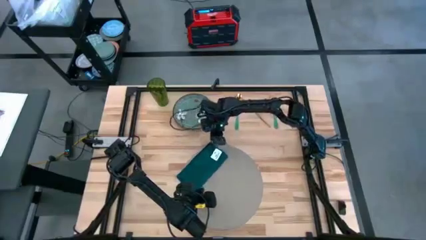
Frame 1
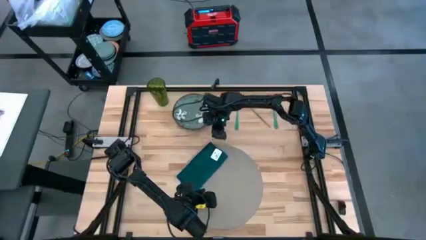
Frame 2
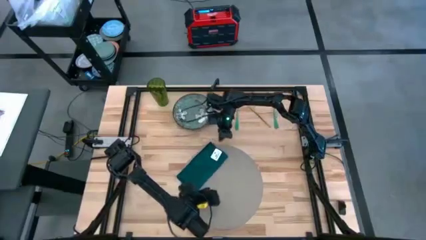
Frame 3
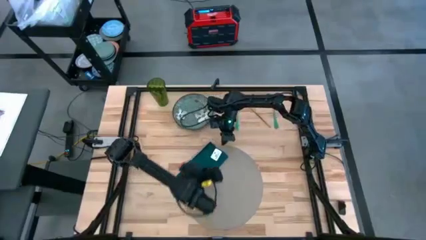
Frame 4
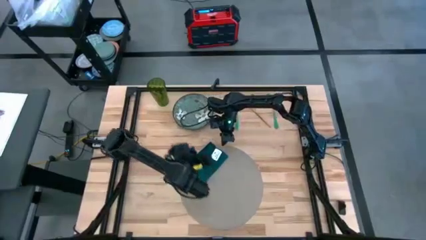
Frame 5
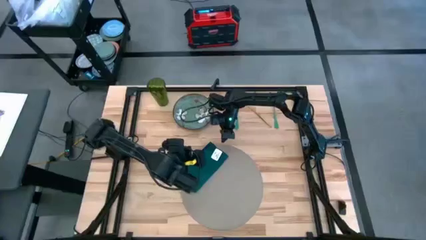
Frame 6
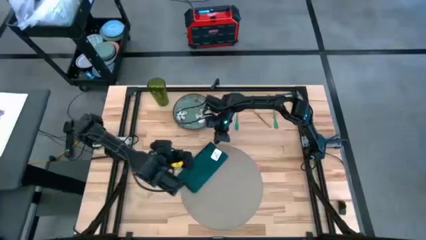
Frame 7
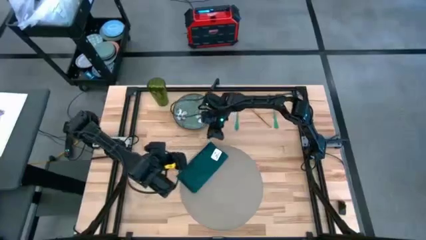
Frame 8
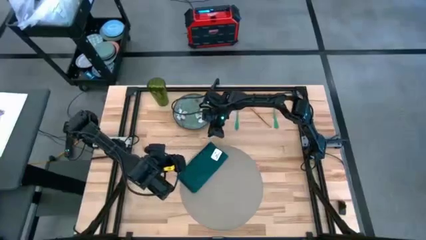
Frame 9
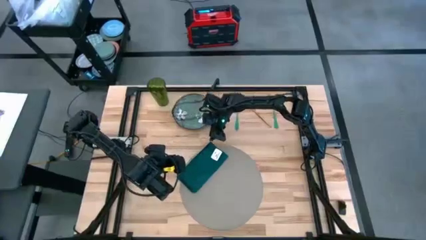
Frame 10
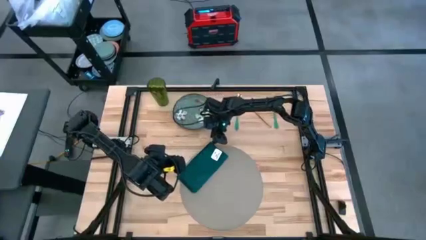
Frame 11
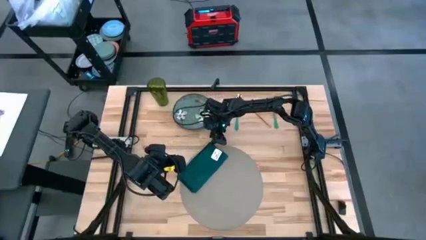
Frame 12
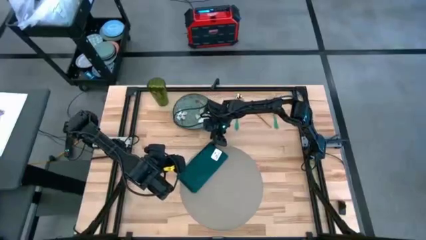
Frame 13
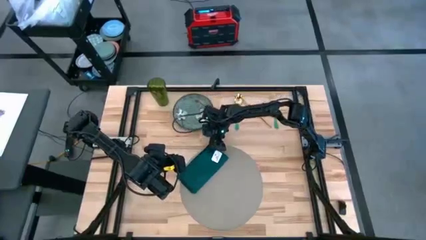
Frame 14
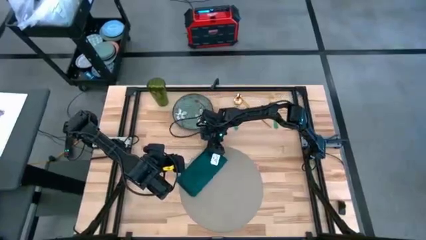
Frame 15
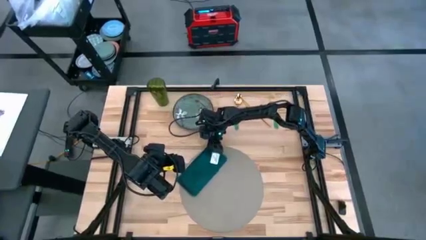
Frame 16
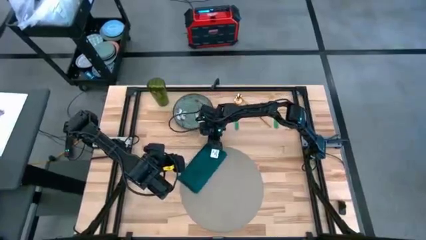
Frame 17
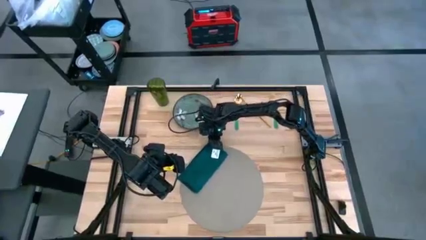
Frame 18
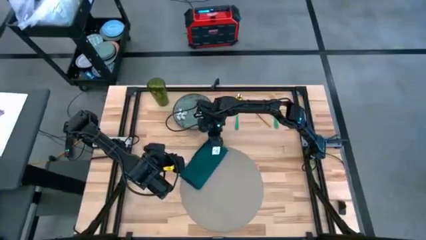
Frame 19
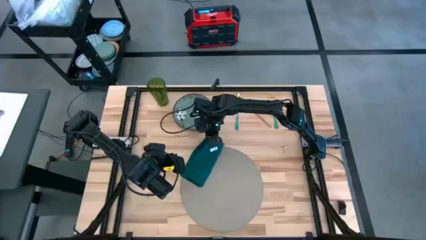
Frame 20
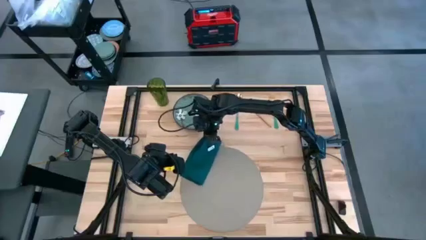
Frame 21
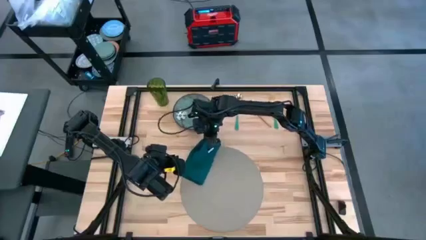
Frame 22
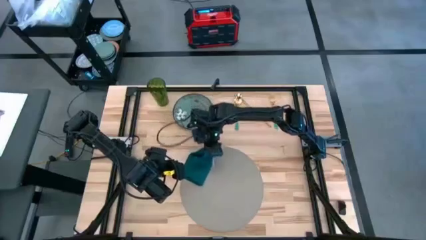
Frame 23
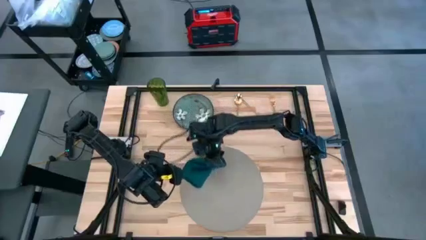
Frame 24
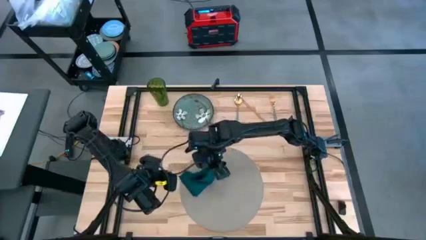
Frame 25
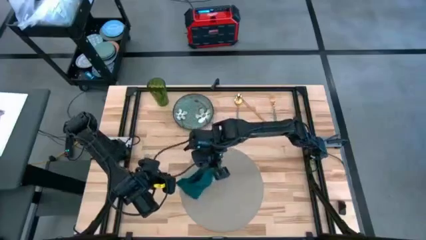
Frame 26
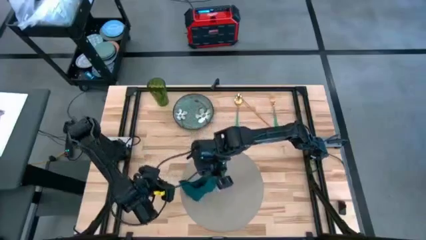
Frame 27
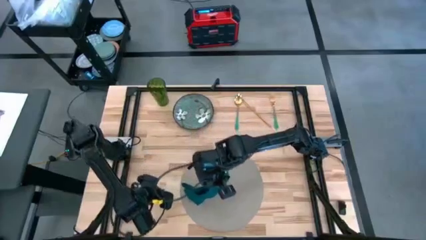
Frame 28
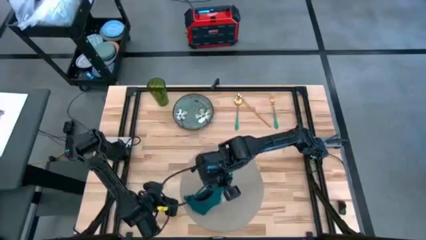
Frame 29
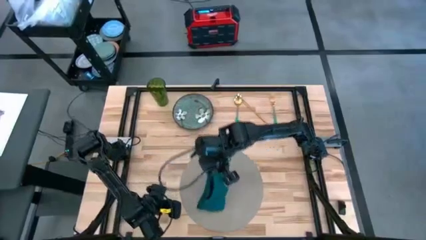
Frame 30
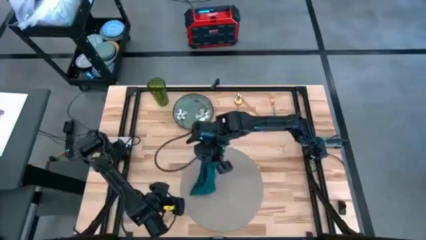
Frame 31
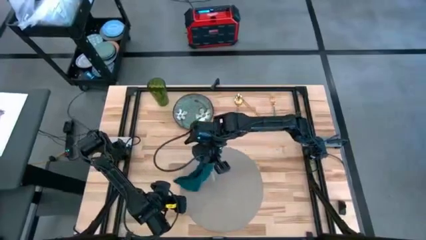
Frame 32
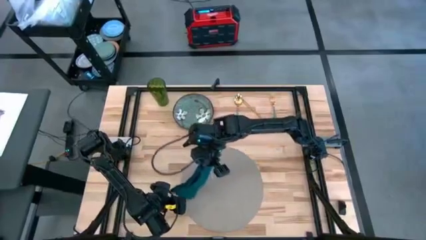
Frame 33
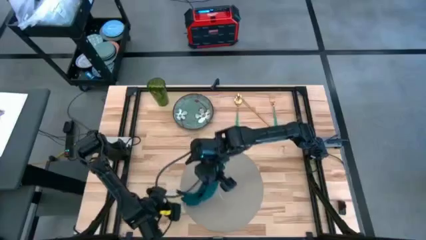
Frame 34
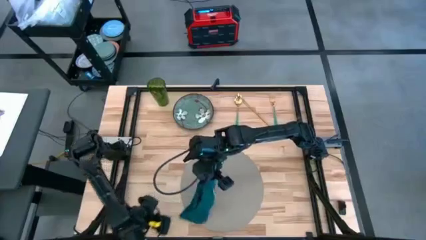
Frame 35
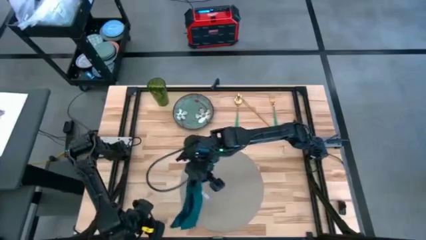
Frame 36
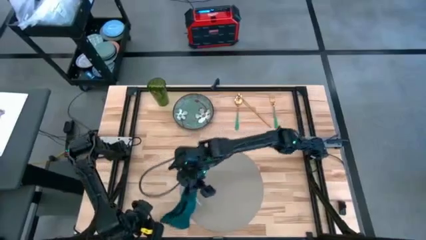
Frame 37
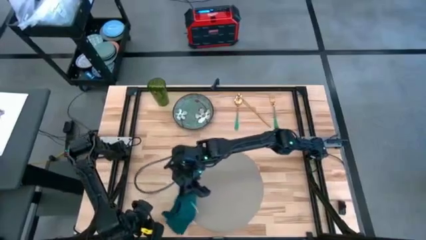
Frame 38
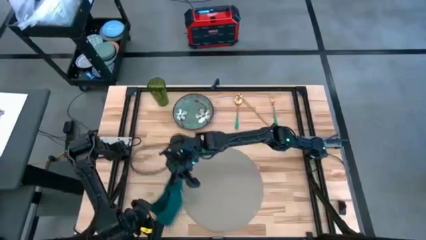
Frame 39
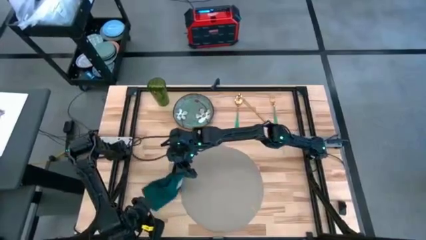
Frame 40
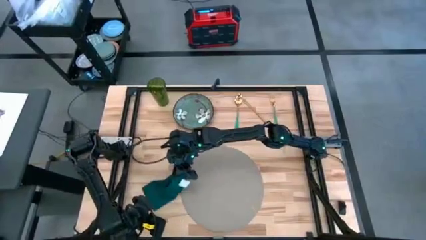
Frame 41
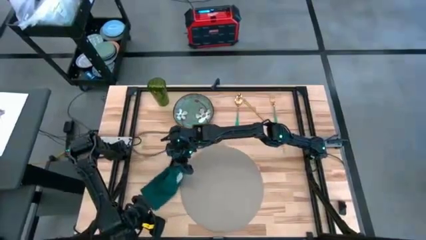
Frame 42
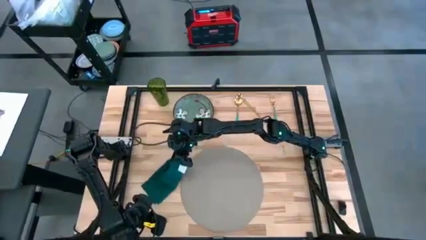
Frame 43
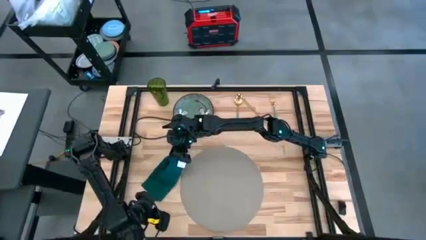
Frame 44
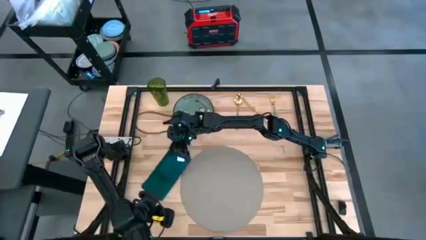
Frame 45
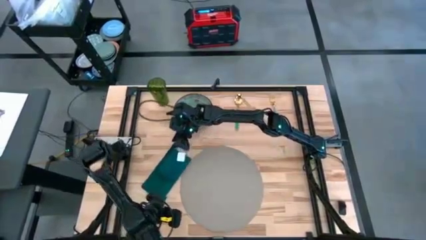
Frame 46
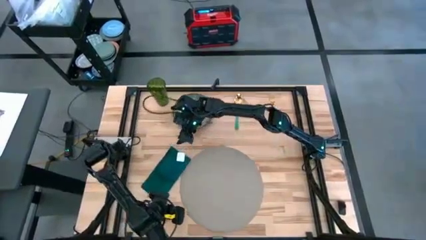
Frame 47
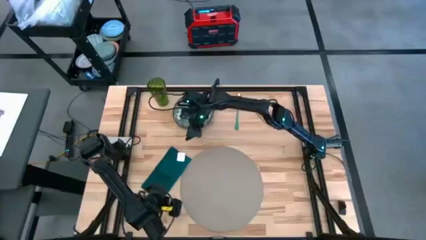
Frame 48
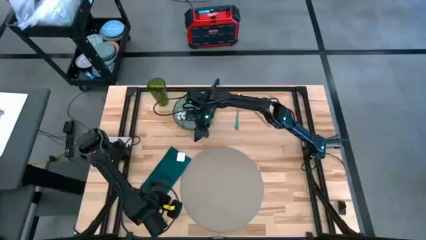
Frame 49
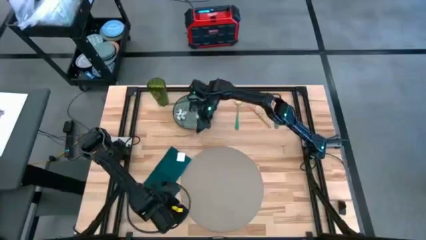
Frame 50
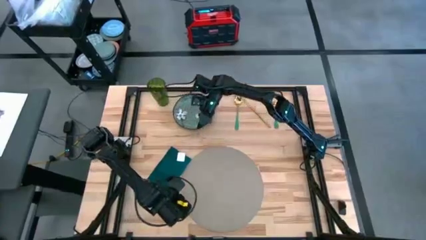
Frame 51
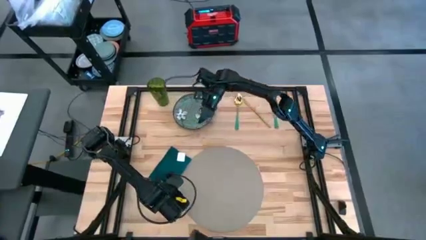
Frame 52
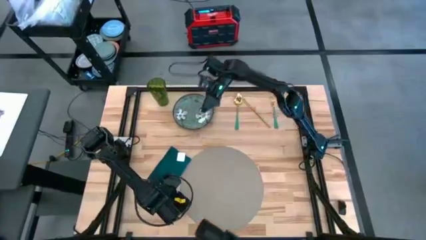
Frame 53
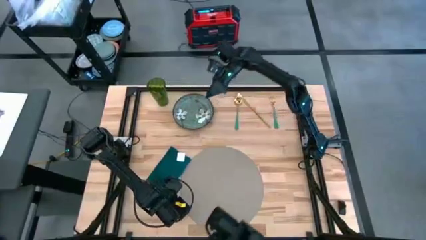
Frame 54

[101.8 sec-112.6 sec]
Task: Set table place
Put the green napkin on the gray table mat

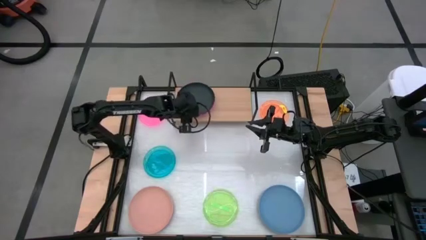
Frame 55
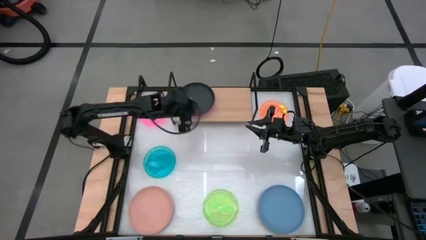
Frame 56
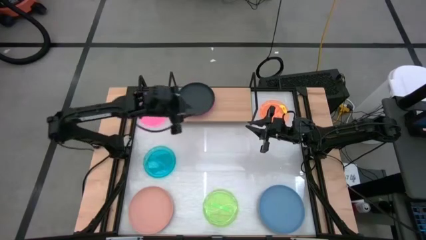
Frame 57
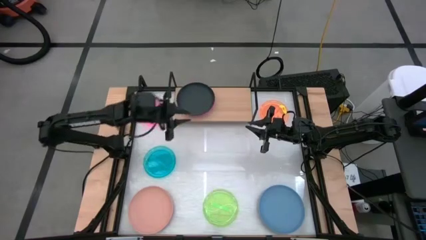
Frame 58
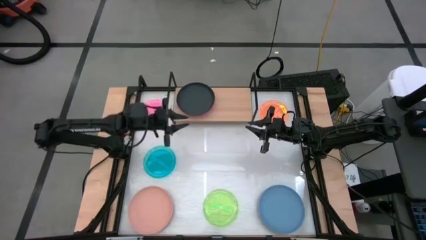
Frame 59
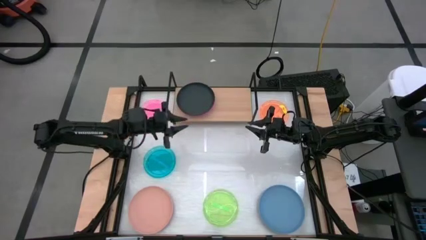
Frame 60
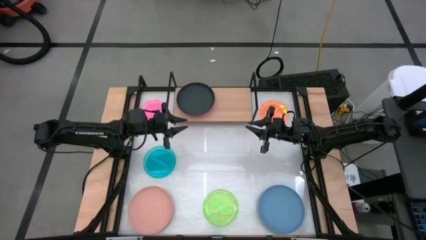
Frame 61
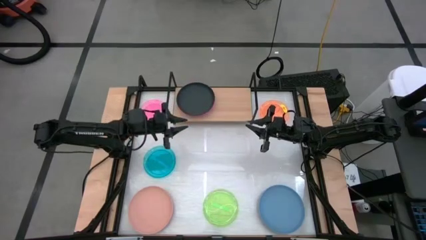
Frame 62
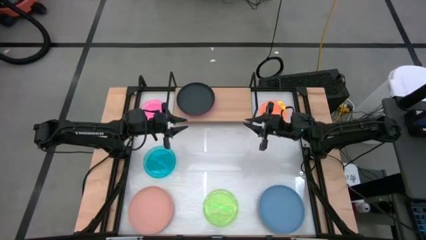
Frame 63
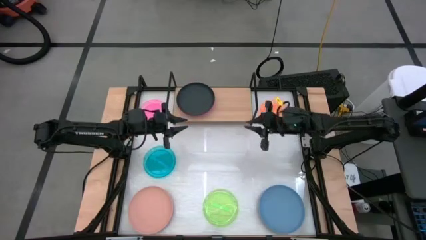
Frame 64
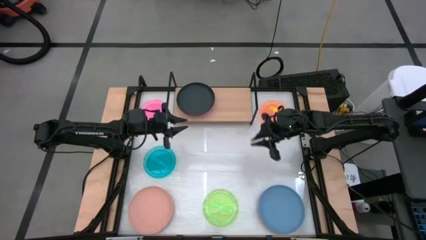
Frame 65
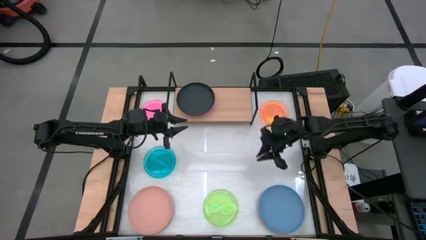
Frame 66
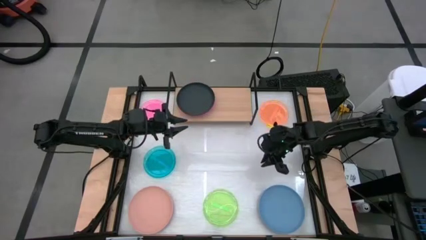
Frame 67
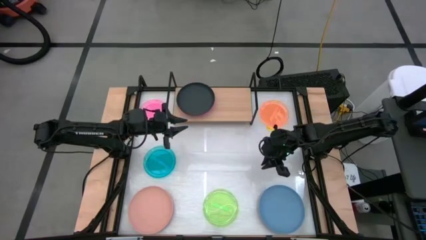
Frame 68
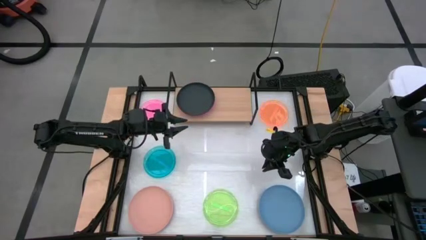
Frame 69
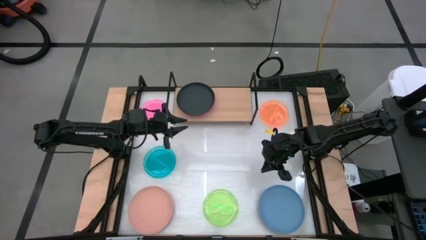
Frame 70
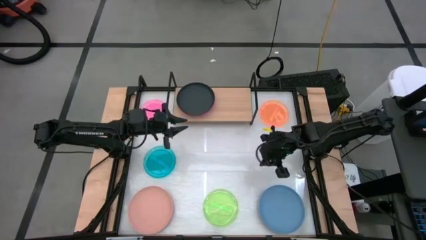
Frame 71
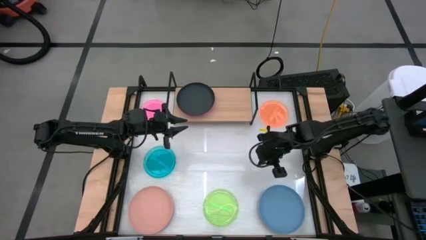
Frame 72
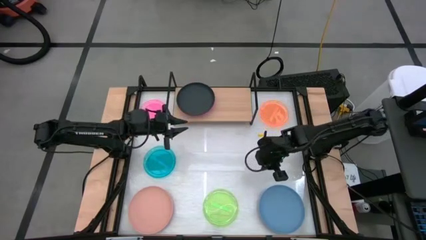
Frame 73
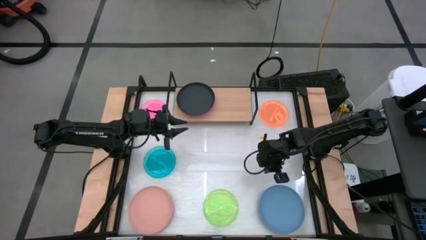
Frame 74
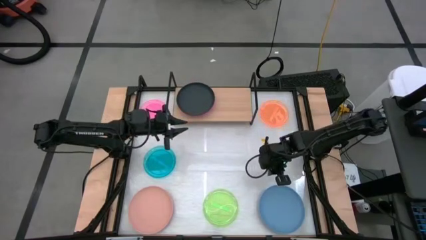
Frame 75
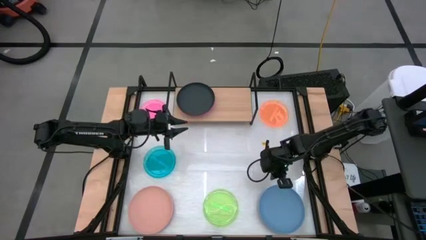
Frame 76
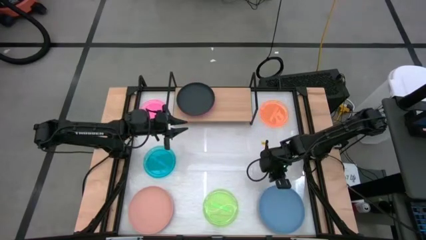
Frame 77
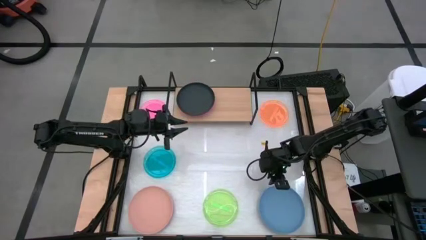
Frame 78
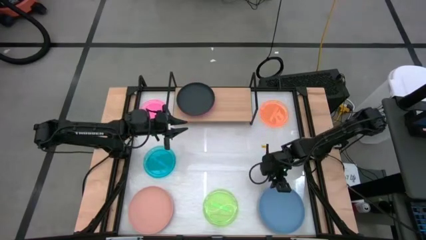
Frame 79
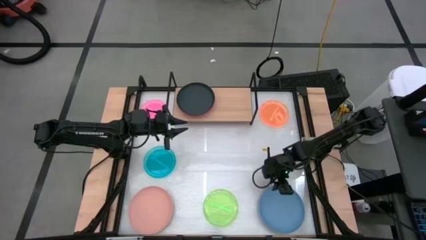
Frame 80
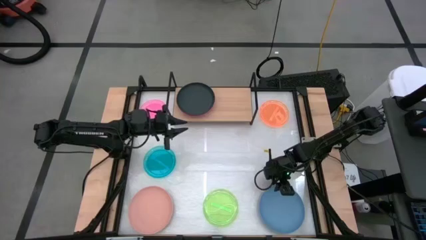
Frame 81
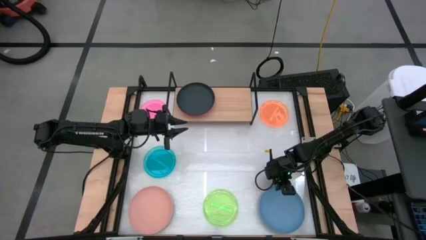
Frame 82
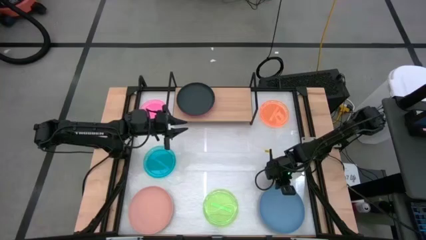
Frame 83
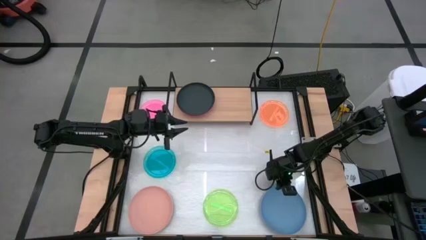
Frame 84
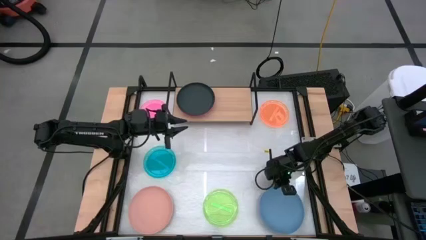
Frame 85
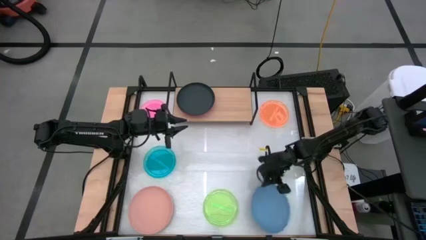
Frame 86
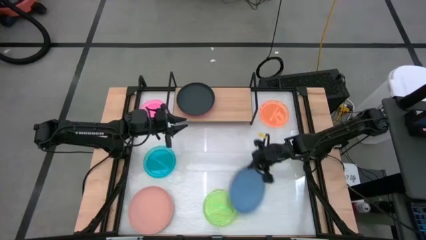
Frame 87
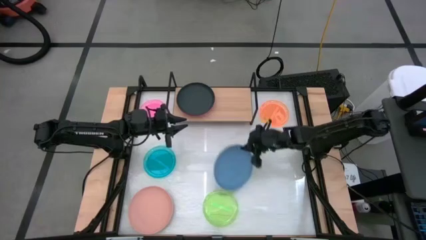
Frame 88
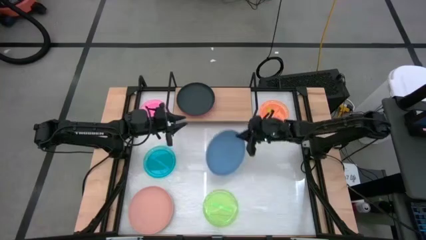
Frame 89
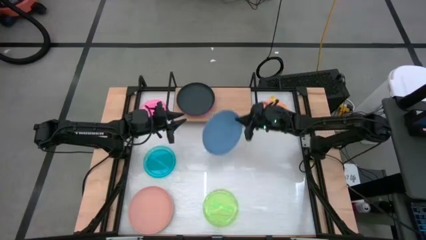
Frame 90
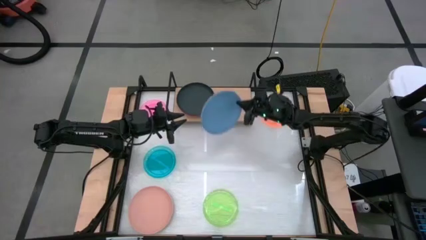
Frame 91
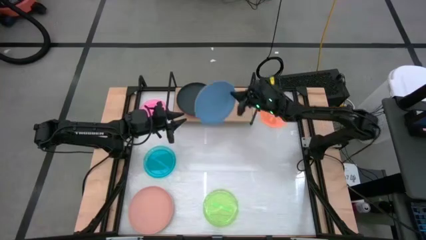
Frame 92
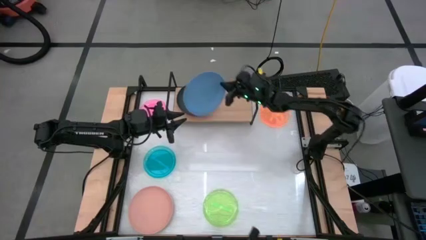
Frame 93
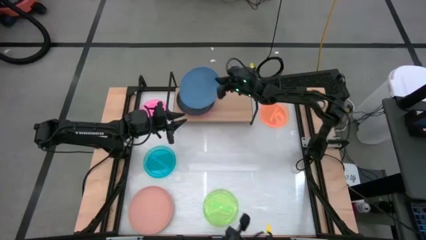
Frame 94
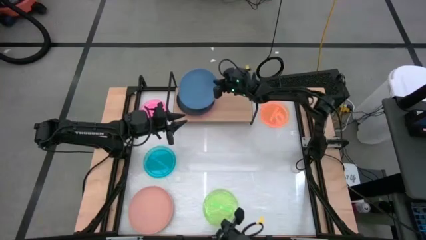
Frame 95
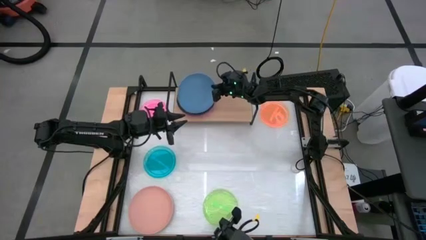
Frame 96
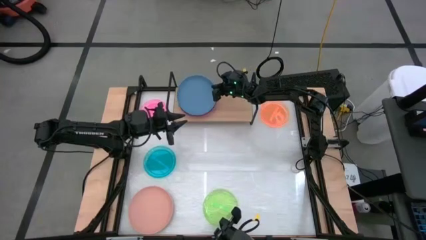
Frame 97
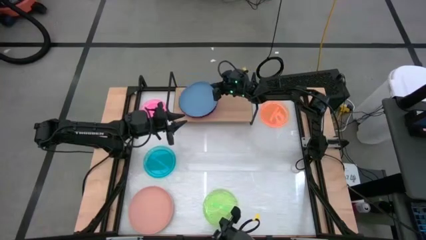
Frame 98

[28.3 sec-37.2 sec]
Task: Place and stack plates onto a shelf
Stack the blue plate on top of the black plate on the shelf
